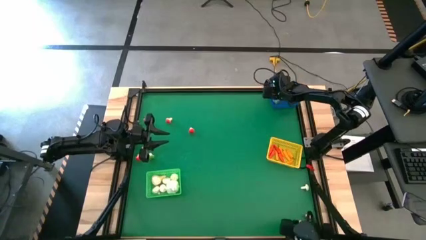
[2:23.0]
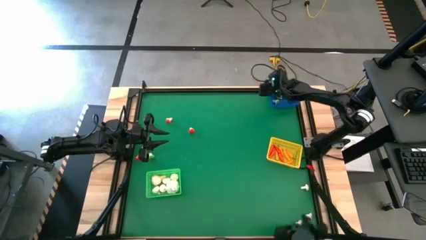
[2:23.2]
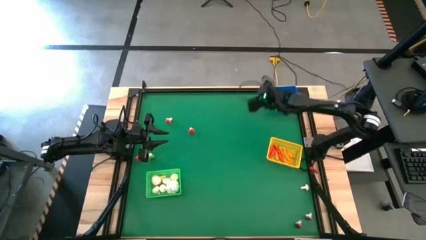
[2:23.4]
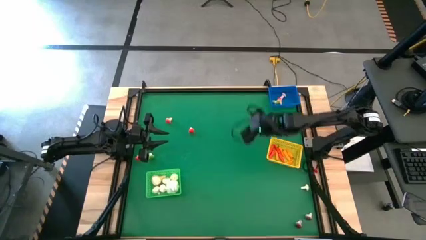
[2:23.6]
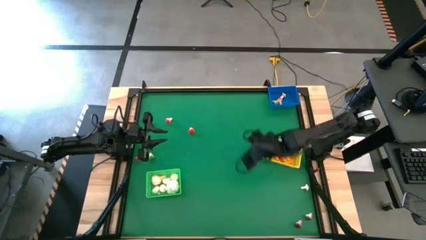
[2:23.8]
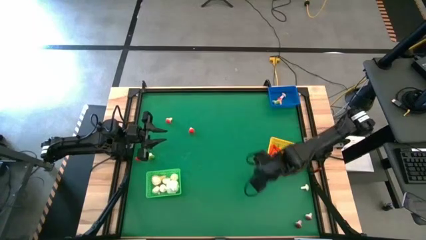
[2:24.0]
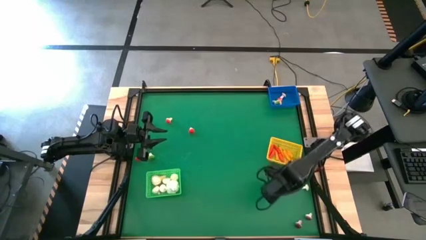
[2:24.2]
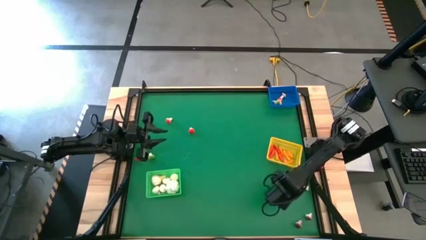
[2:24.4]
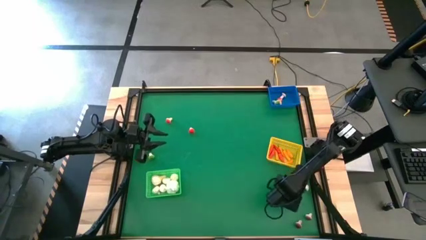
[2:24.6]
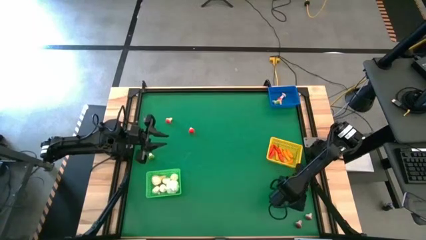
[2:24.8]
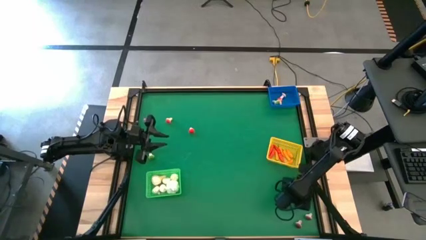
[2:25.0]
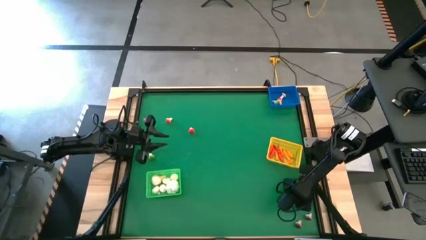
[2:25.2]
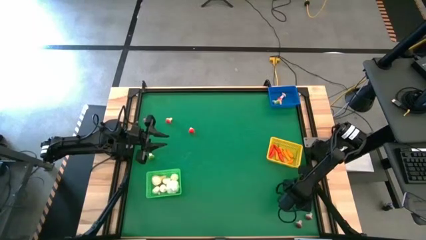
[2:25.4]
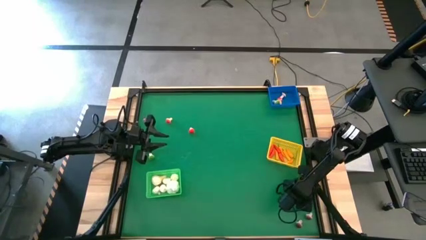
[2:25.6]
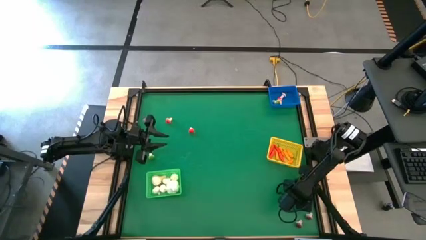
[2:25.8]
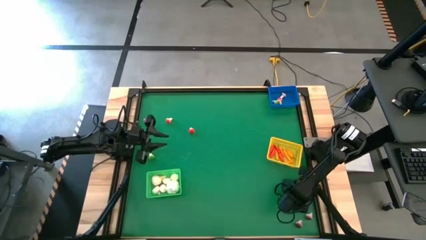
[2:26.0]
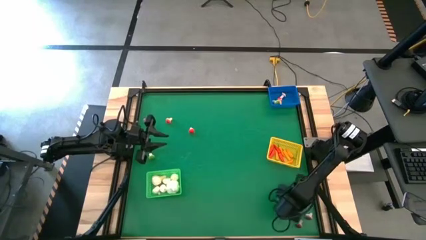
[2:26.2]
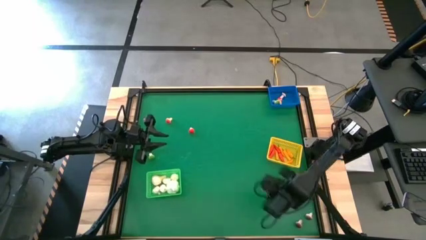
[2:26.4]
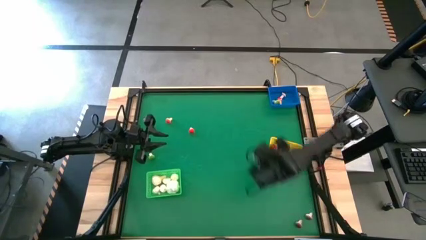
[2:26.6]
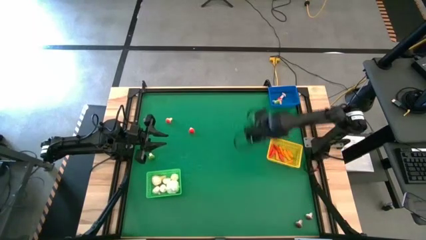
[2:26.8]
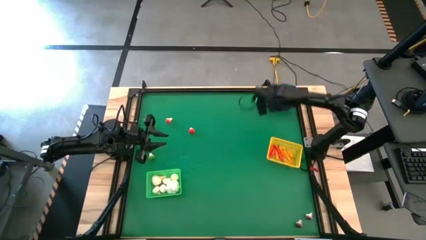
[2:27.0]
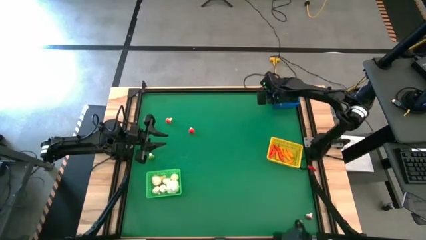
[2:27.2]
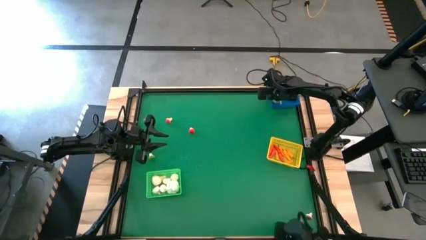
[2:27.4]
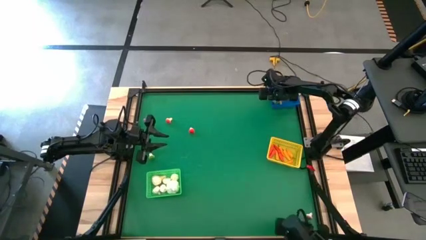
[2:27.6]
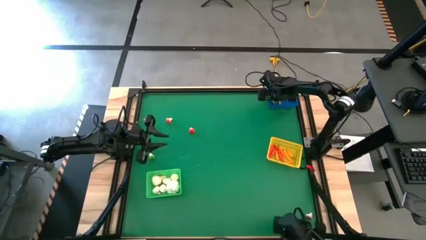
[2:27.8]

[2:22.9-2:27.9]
Task: Sort produce into baskets
Put the green mushroom into the blue bin

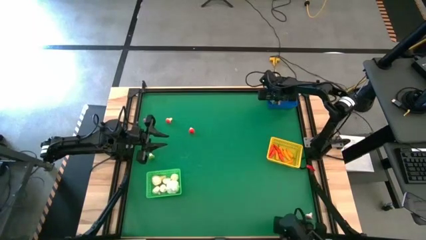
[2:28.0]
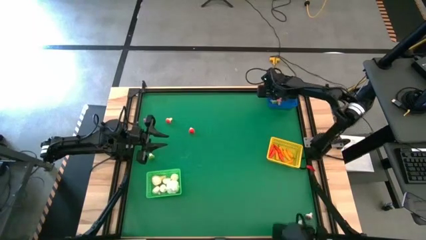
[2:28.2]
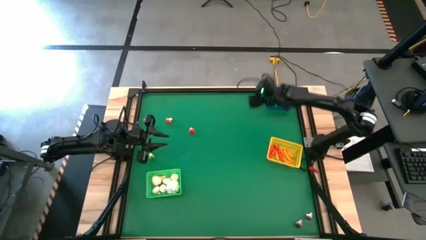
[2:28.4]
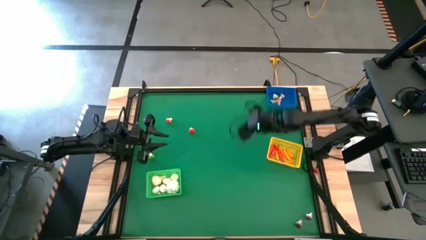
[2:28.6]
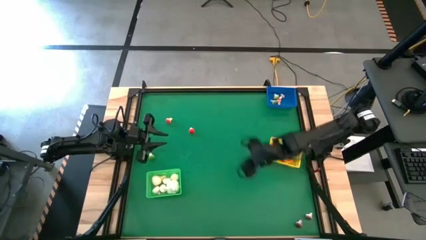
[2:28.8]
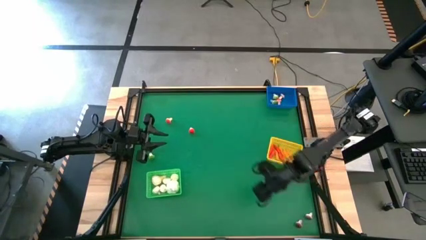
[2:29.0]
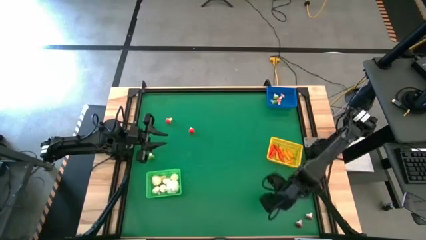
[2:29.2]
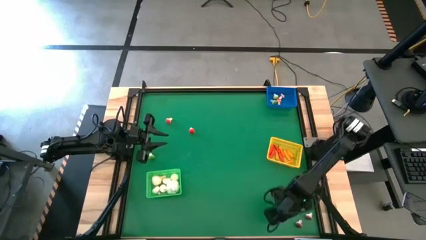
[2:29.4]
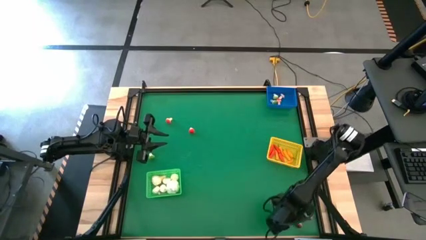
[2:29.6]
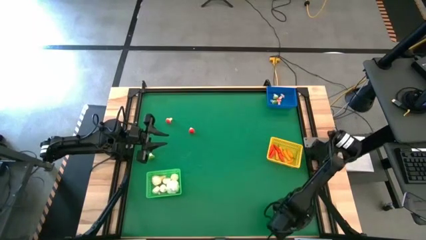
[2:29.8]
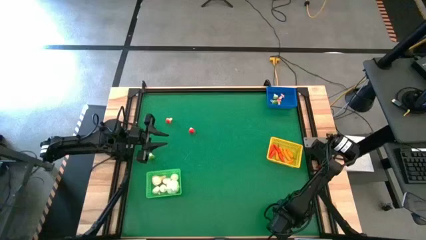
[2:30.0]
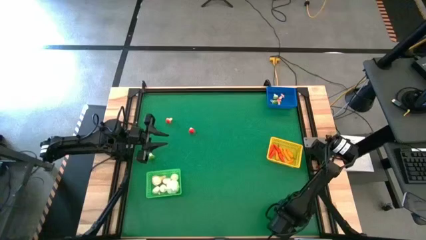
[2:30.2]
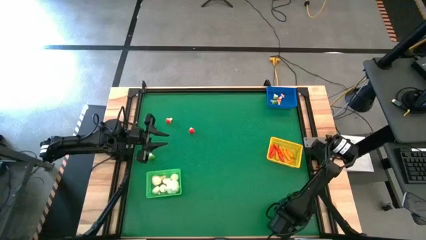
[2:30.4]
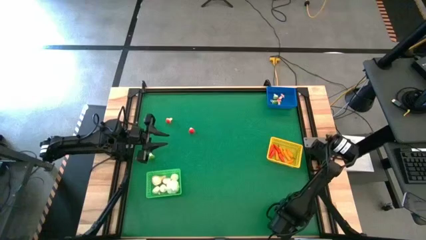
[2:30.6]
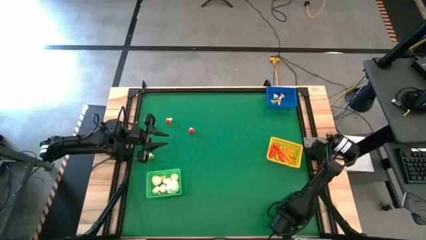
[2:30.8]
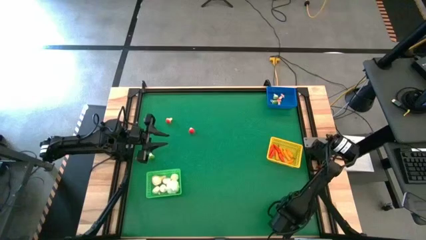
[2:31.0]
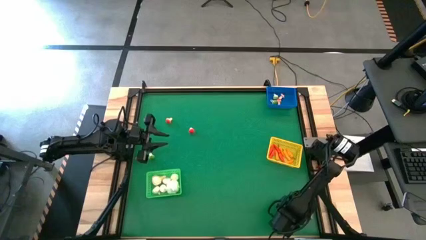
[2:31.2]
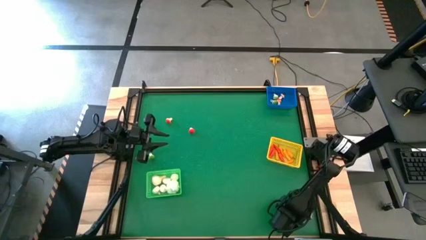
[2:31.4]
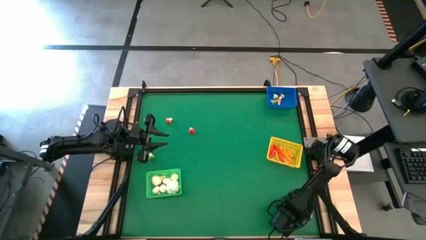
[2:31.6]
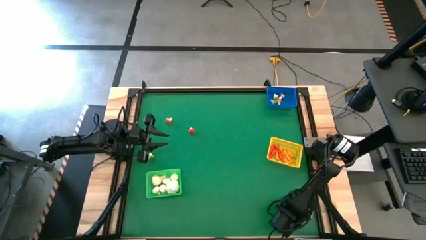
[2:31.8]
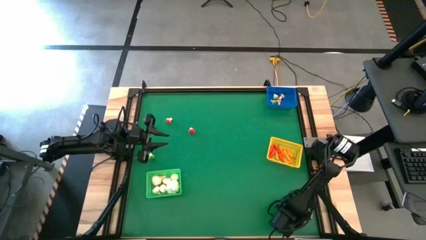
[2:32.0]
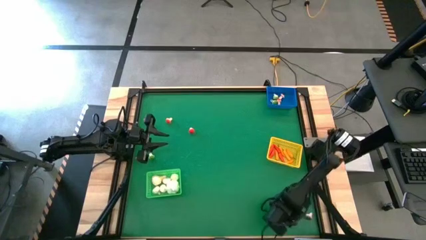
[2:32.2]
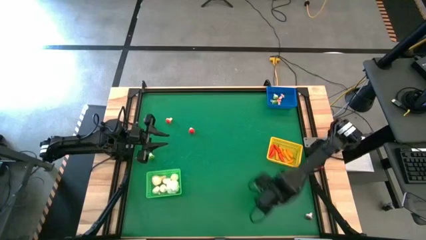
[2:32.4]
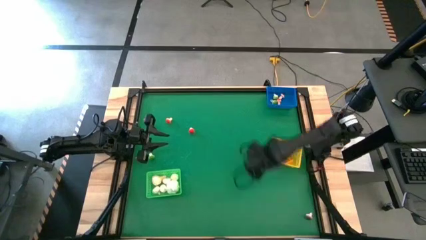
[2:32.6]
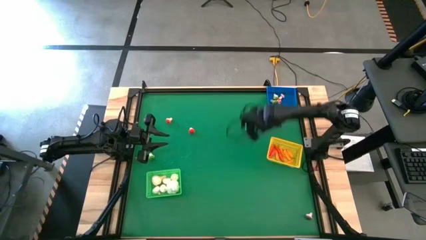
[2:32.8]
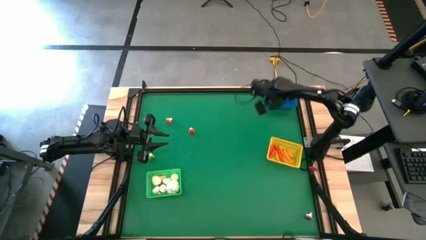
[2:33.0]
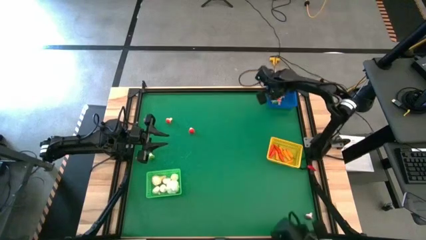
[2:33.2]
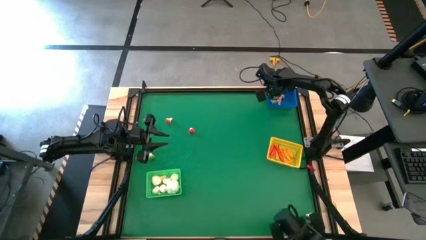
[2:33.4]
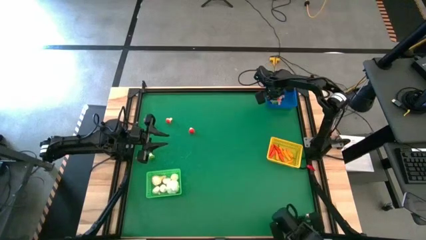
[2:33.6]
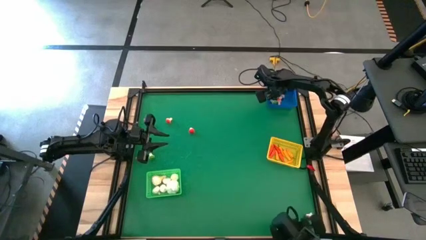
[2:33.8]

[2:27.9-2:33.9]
Put the brown mushroom into the blue bin

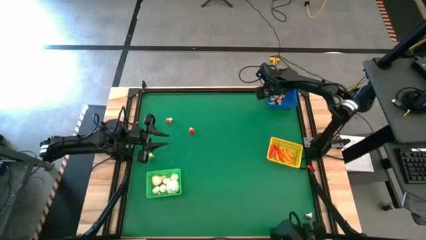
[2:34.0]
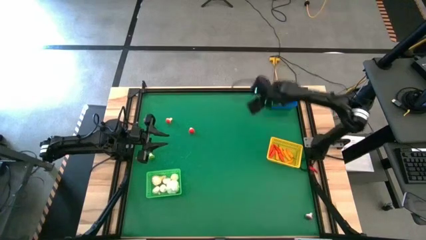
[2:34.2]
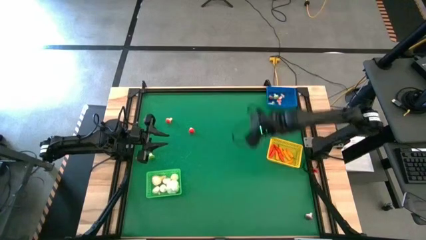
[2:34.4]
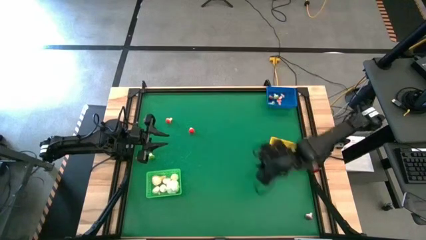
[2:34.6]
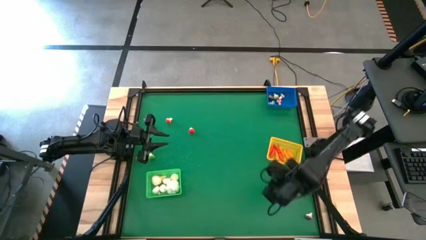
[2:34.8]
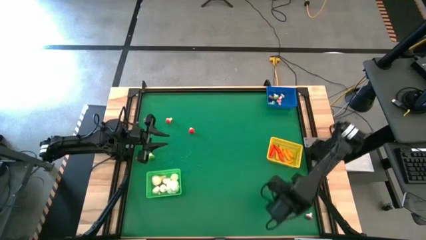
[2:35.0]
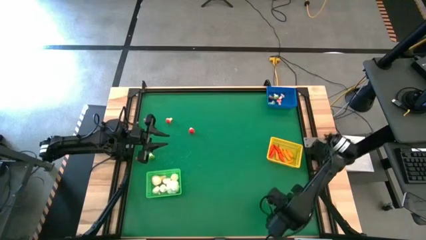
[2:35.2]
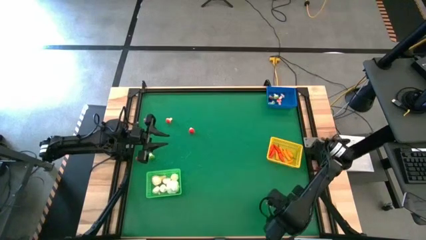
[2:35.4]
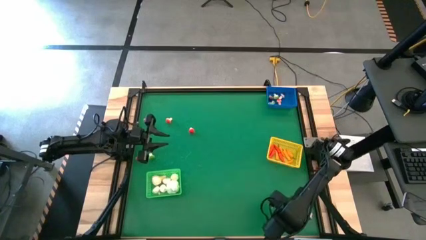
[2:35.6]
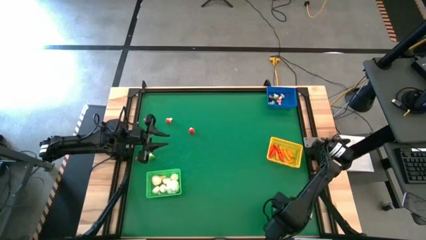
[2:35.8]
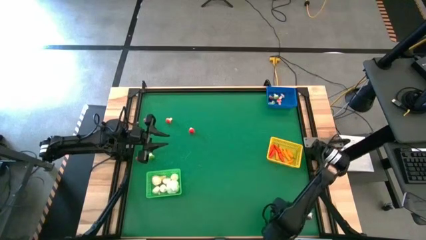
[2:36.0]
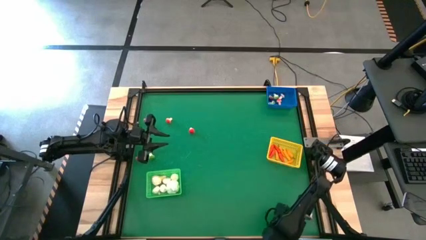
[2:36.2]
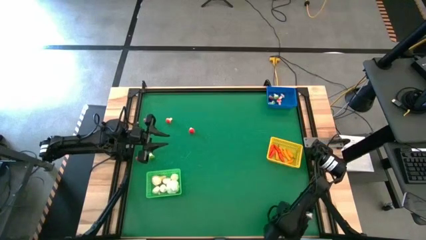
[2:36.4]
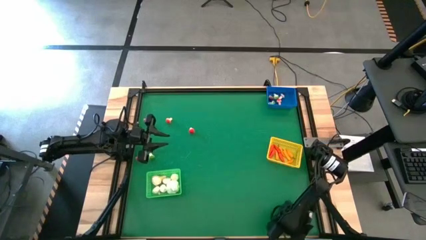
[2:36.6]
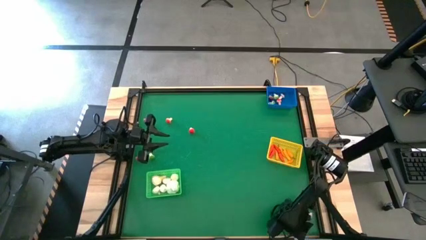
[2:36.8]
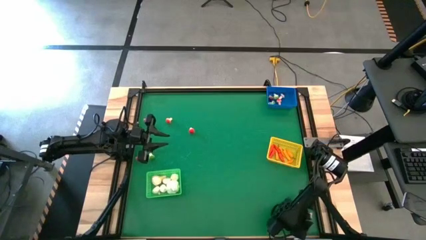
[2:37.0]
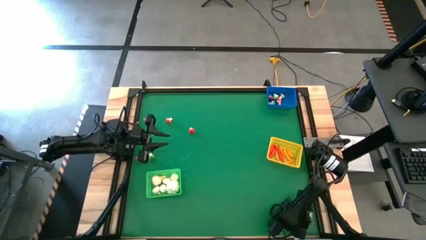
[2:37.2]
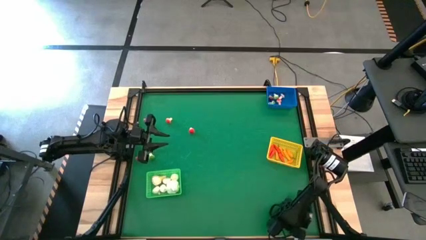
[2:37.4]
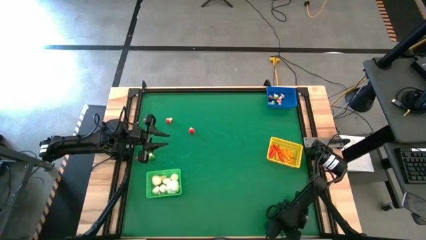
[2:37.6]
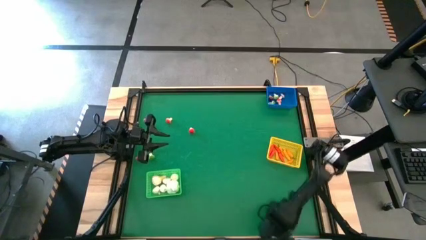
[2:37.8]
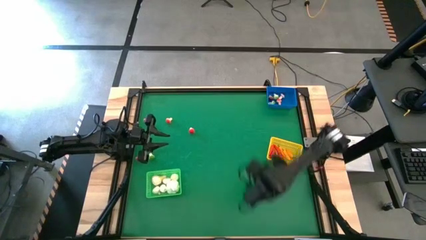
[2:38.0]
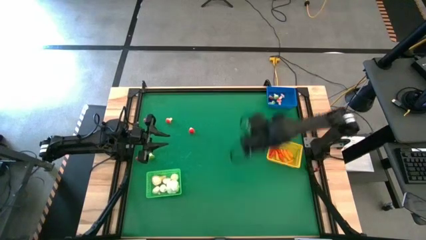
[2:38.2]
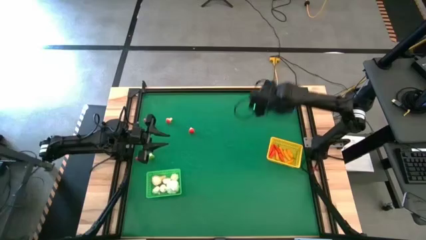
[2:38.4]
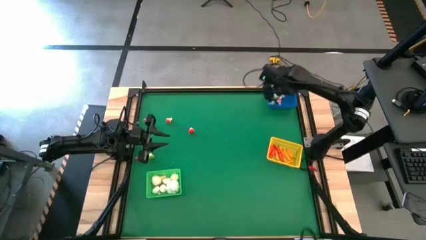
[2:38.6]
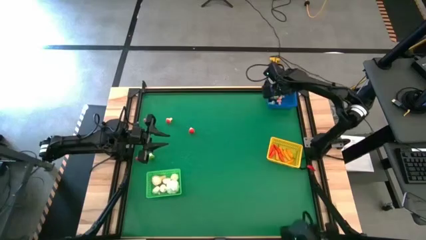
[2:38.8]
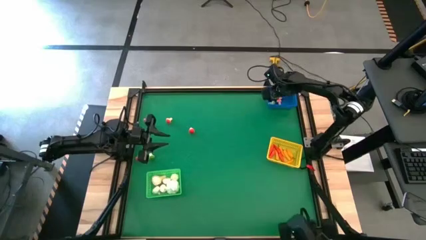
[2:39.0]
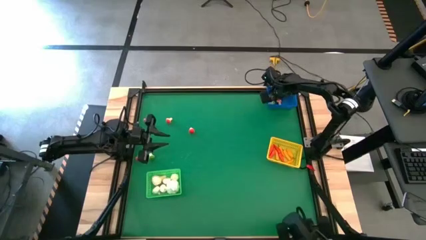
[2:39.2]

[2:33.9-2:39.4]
Put the brown mushroom into the blue bin
